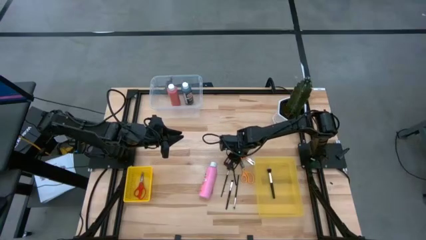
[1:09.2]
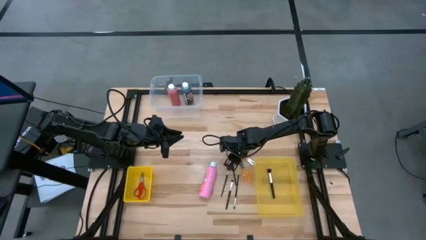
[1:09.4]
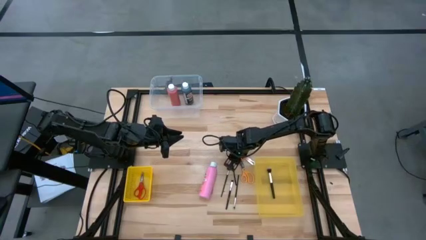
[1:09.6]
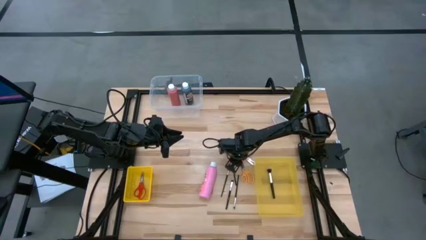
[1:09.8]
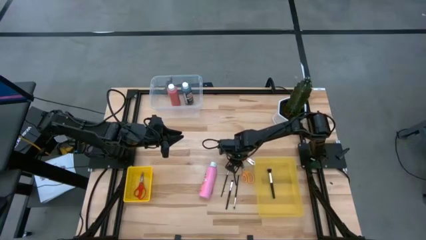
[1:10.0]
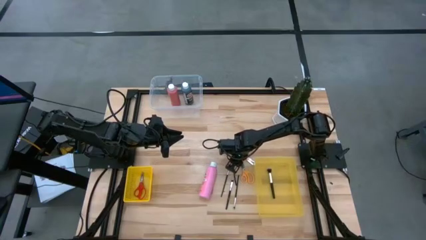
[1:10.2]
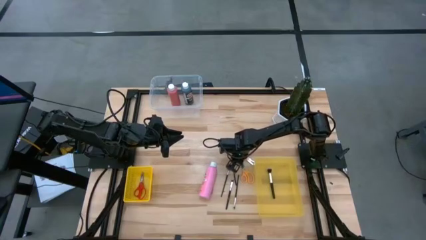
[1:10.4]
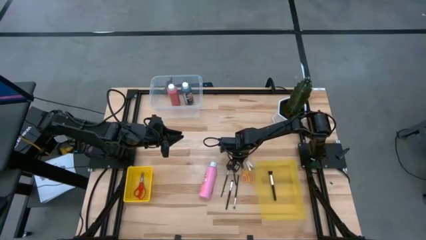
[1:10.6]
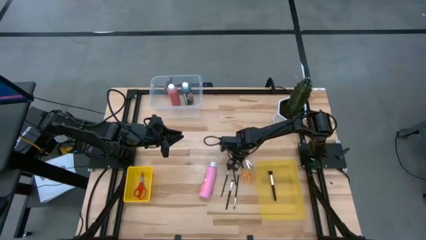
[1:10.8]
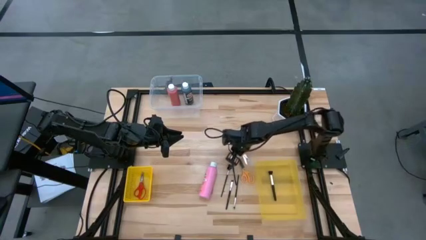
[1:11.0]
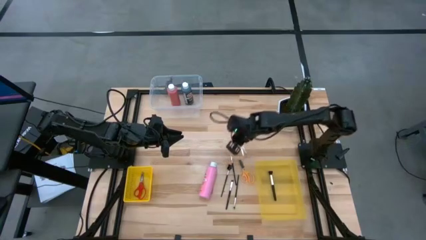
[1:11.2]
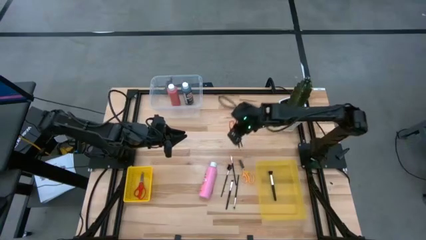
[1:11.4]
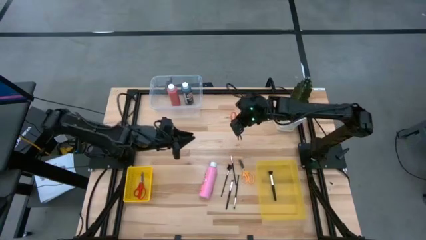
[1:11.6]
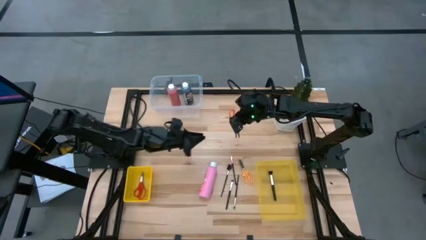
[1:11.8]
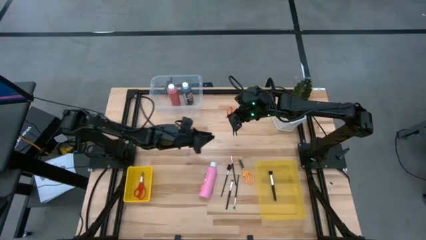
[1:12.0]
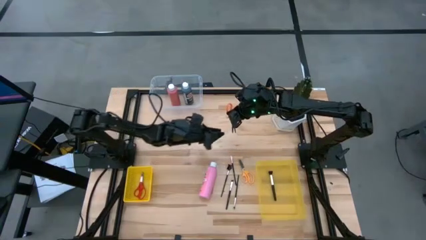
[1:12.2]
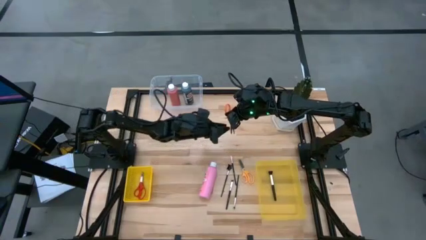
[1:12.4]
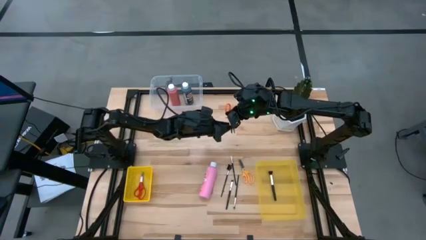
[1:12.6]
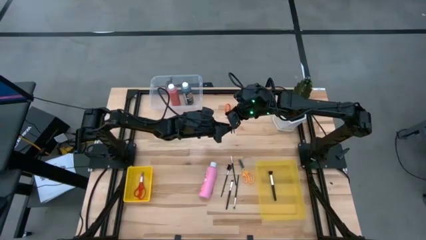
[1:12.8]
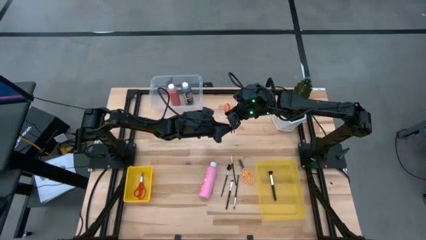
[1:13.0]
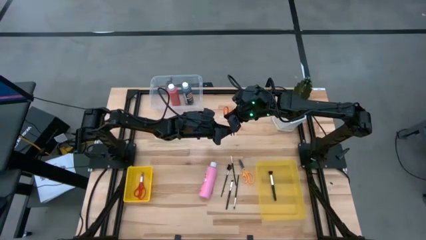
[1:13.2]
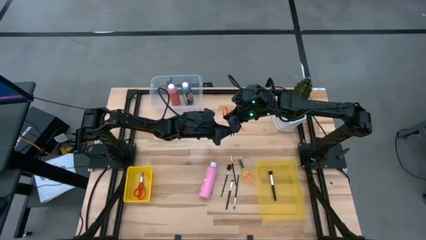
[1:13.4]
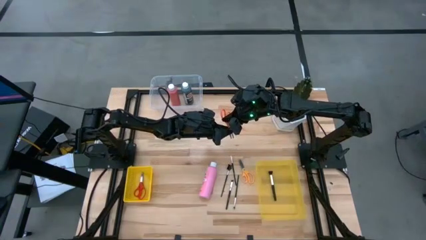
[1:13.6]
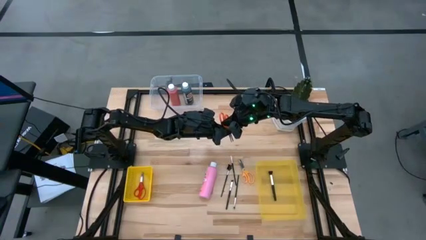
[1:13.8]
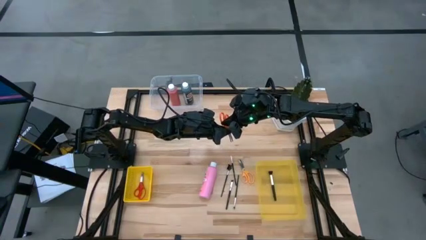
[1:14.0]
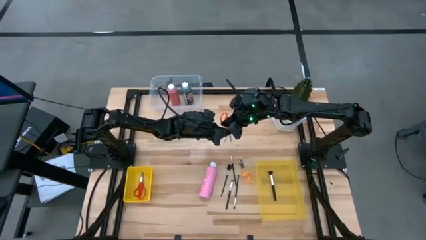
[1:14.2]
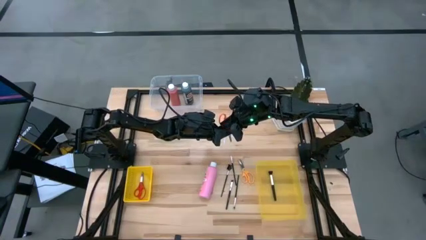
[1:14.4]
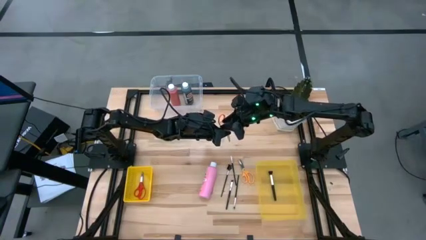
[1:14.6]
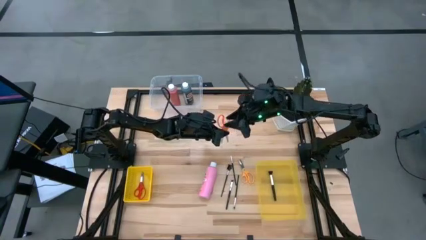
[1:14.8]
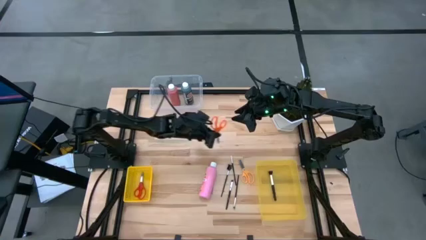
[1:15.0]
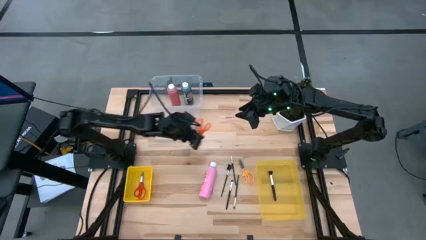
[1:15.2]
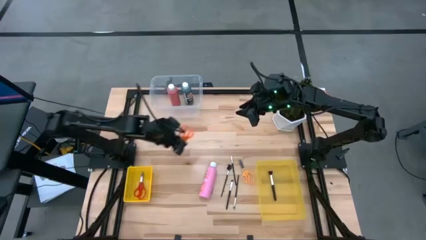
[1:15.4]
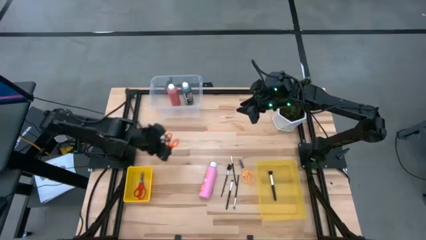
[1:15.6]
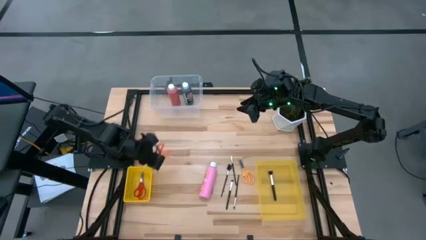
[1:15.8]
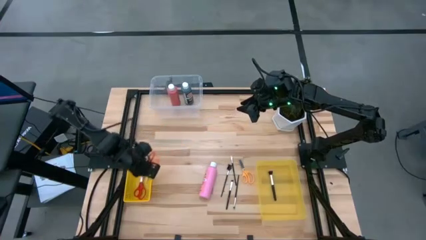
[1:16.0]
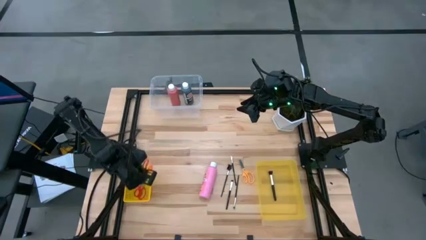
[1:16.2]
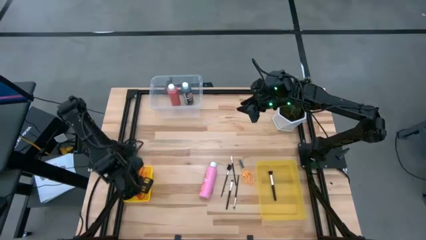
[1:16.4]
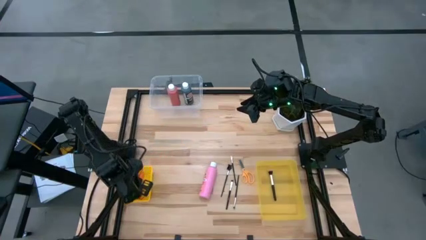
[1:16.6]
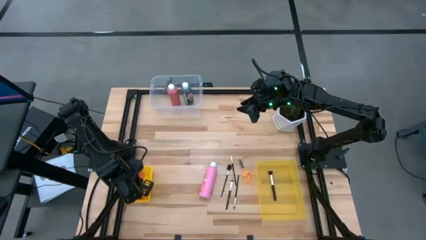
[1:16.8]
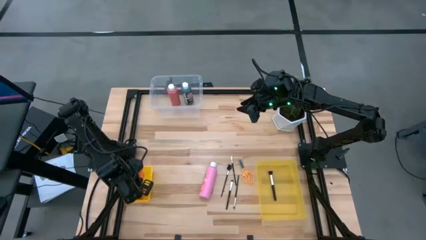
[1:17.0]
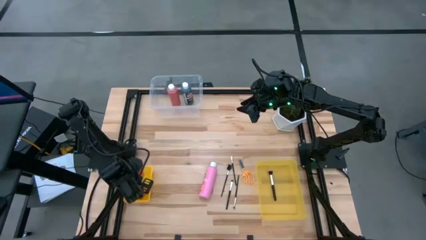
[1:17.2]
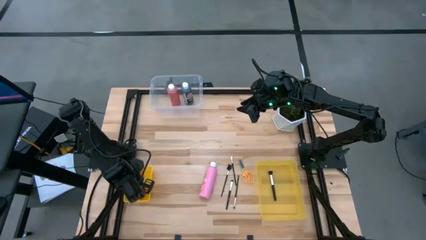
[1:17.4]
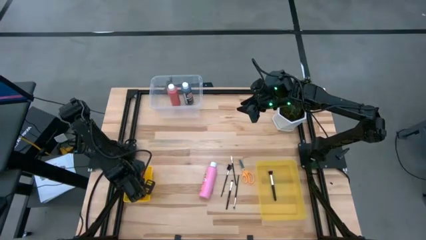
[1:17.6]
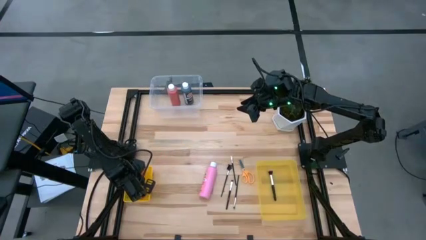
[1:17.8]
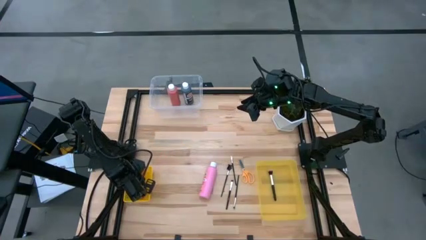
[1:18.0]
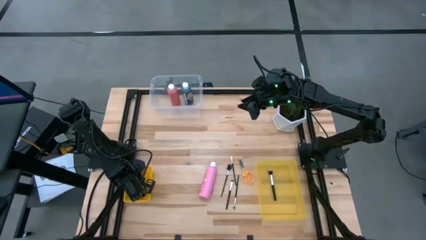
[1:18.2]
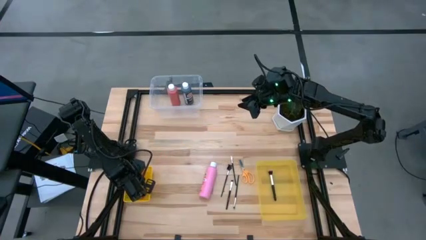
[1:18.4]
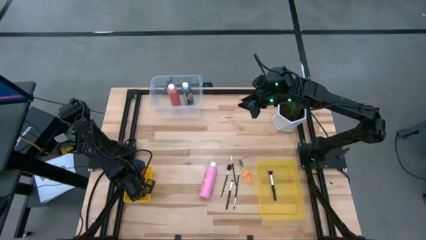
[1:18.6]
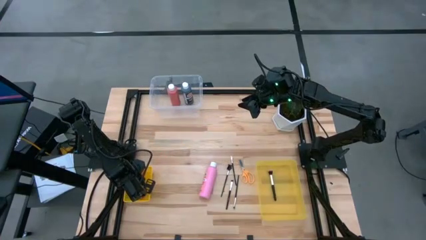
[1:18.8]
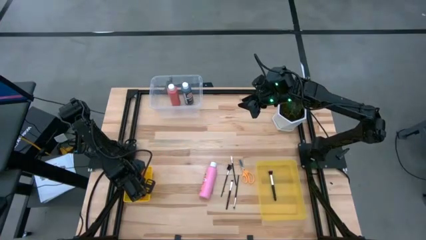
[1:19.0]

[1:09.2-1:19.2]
Task: Pick & Place Paint Supplies
Put the orange scissors into the yellow basket

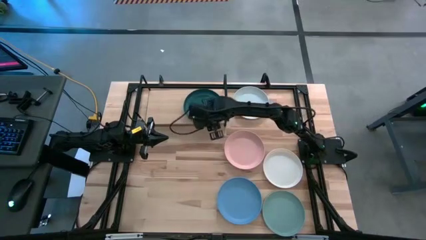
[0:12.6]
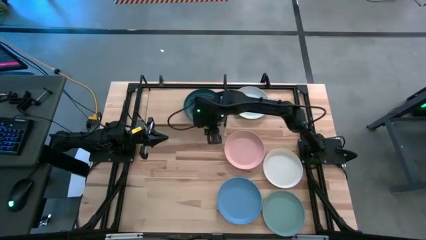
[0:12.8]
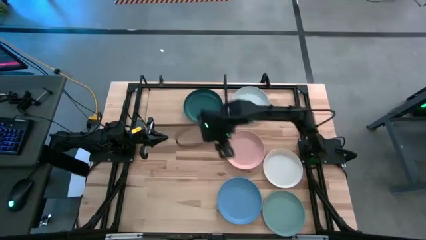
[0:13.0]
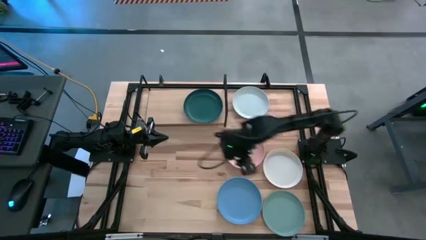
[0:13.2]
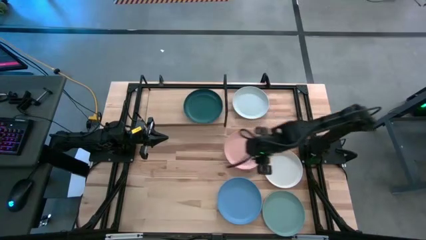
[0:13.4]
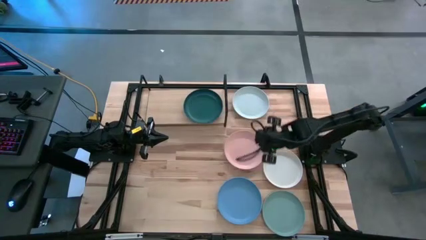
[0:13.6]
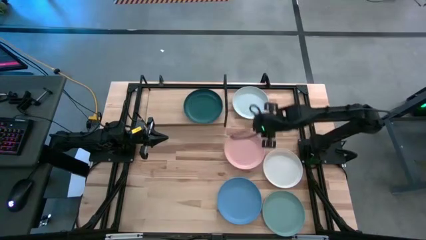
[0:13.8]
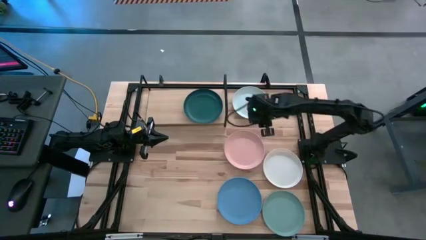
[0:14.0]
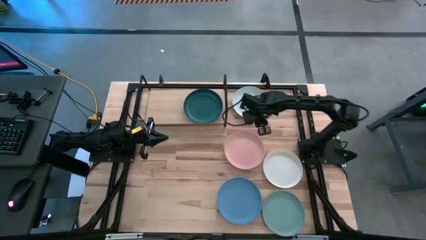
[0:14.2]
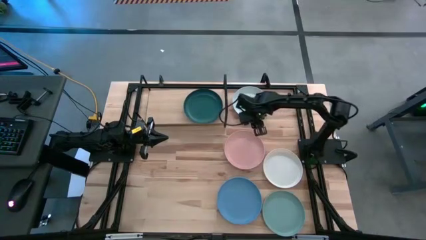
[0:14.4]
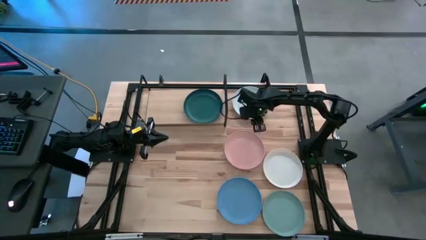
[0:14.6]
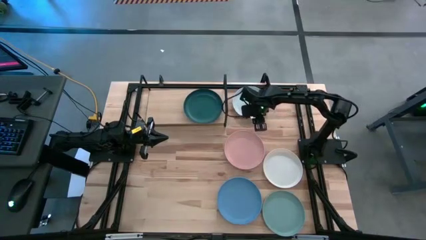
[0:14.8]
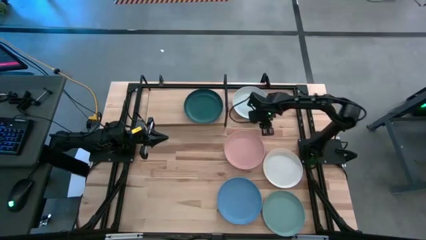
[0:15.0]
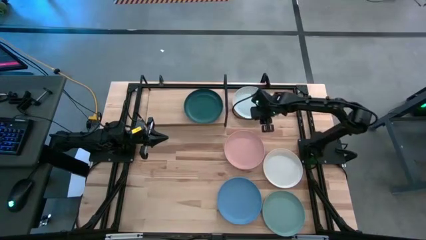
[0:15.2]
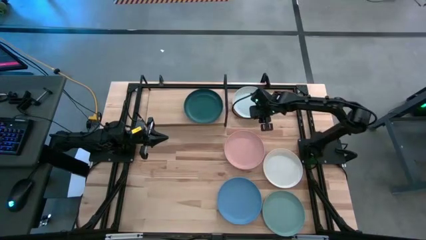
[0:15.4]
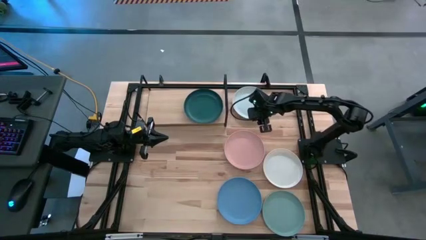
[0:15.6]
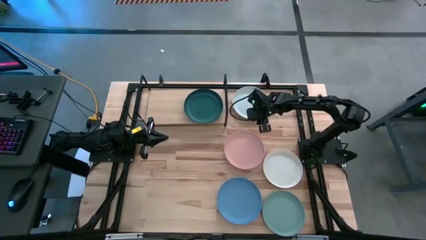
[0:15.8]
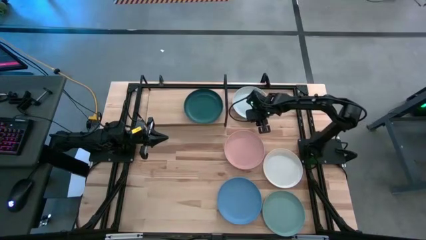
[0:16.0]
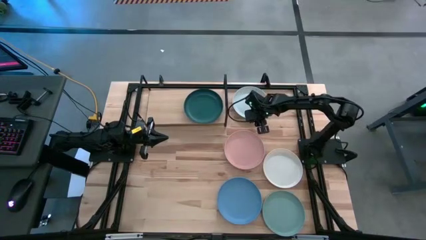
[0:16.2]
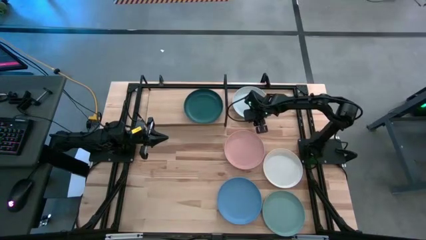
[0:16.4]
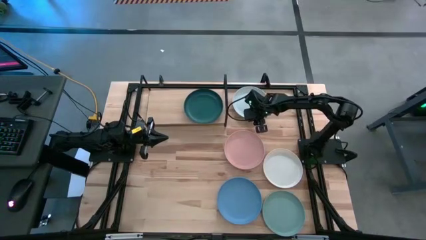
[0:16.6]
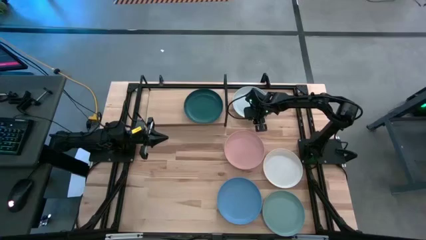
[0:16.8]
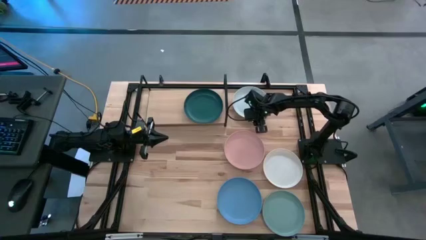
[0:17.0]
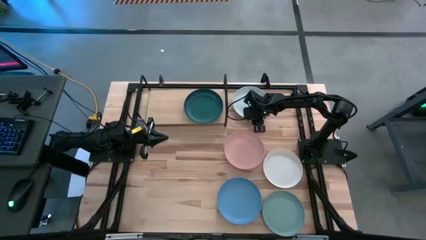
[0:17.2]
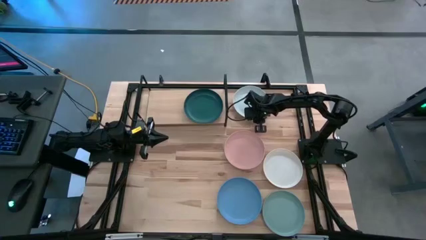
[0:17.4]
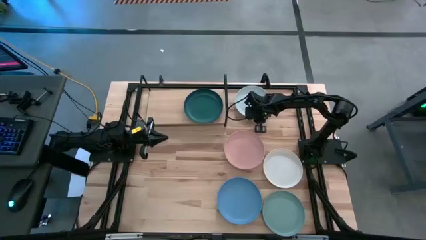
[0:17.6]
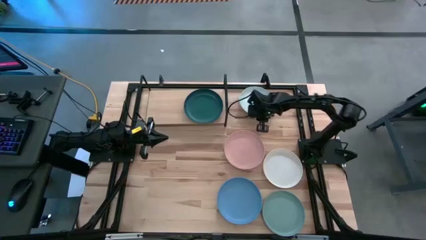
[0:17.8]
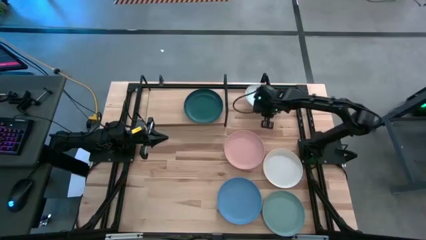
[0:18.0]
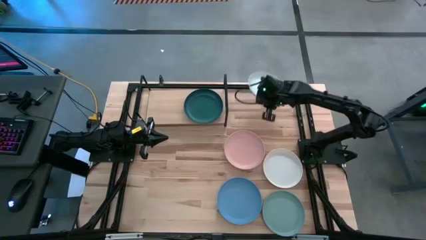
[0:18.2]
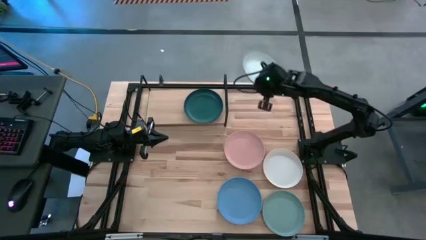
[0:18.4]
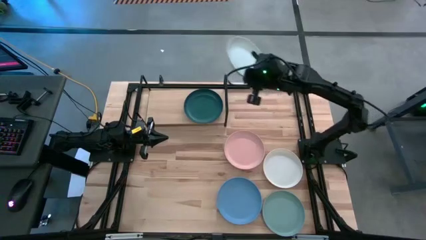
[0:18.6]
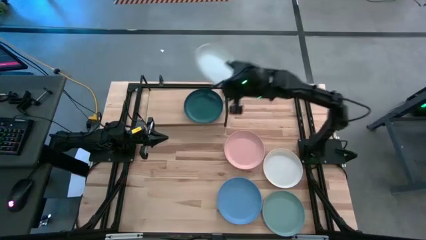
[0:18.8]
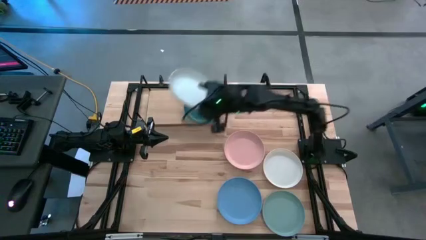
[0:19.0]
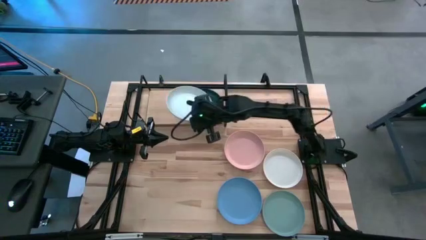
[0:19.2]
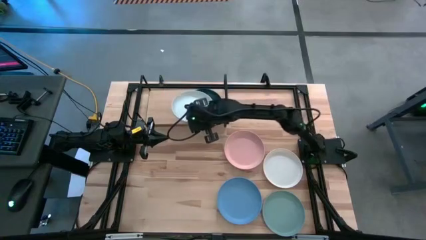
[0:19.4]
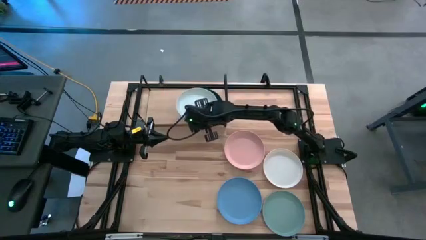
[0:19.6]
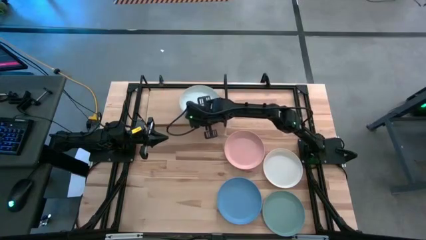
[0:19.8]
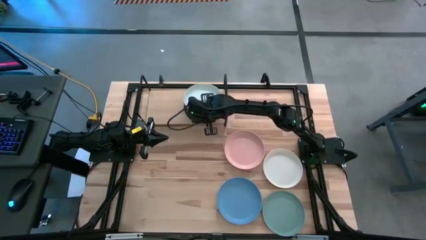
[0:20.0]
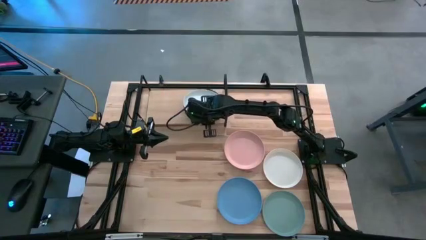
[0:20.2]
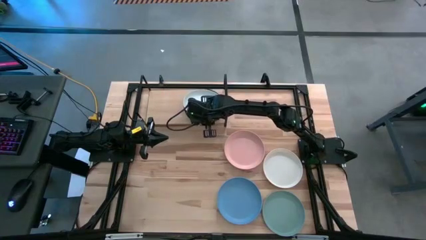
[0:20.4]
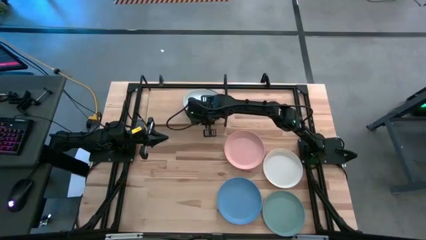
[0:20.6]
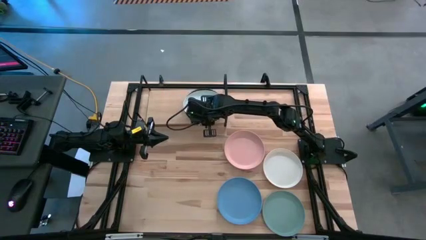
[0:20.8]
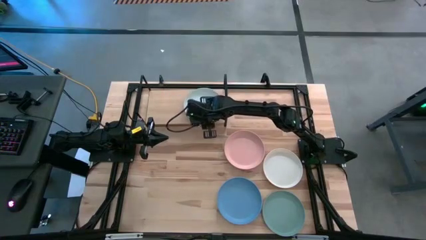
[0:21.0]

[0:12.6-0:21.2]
Task: Place and stack plates onto a shelf
Stack the white plate on the top of the dark green plate
